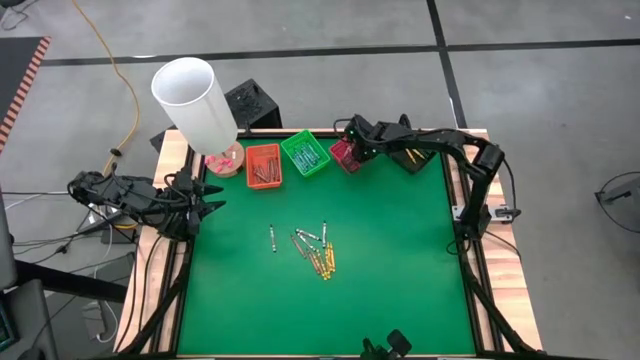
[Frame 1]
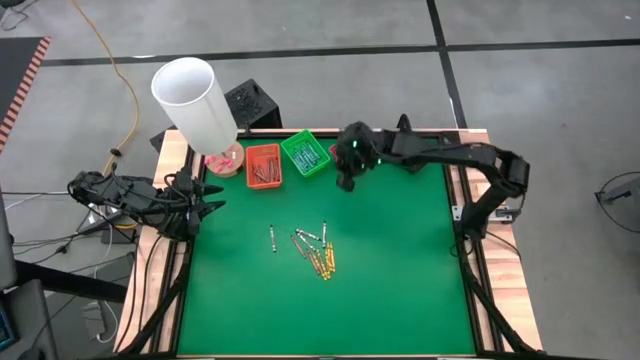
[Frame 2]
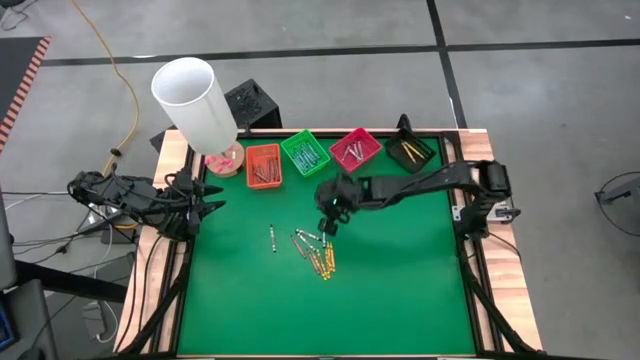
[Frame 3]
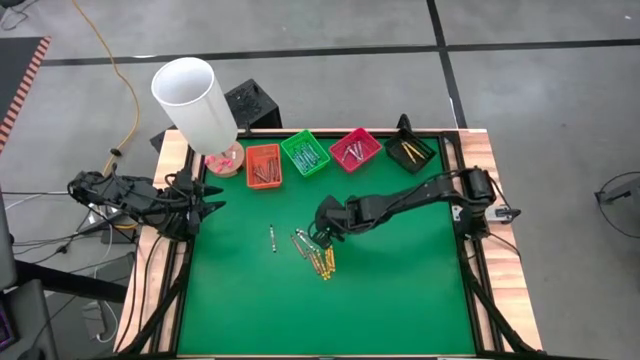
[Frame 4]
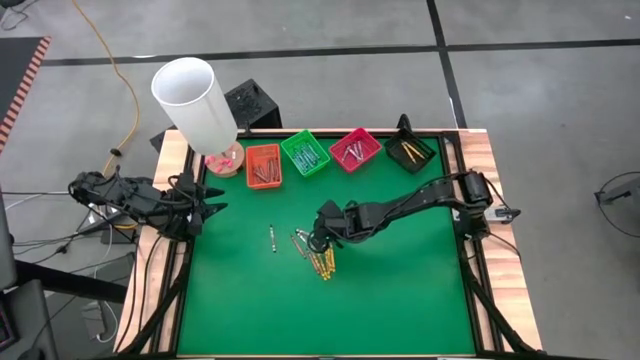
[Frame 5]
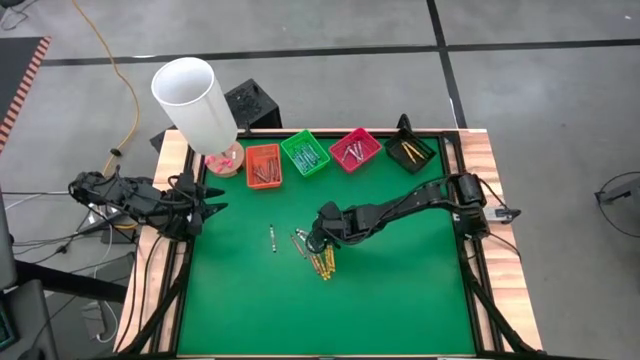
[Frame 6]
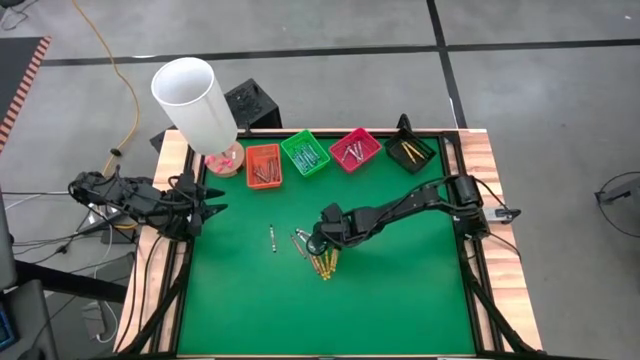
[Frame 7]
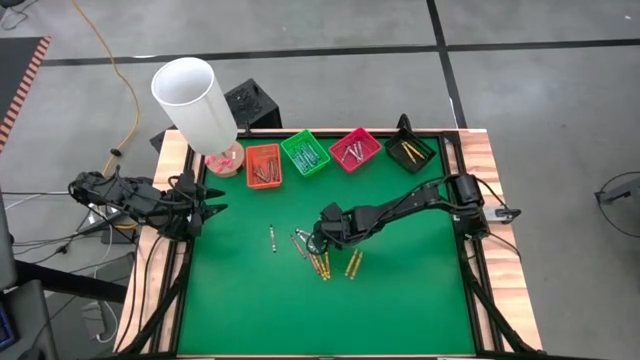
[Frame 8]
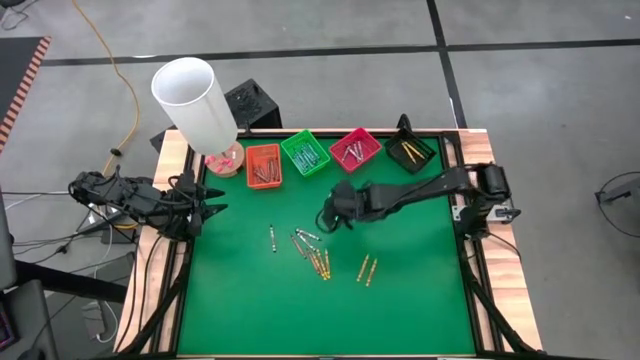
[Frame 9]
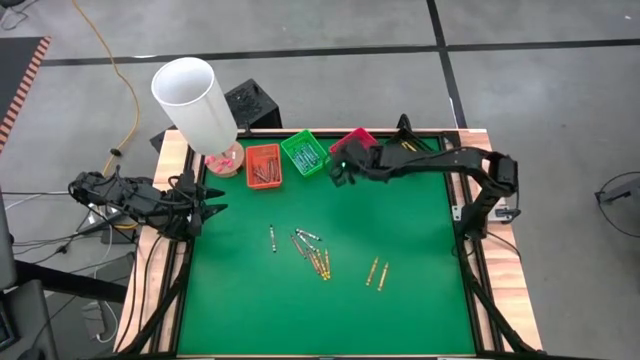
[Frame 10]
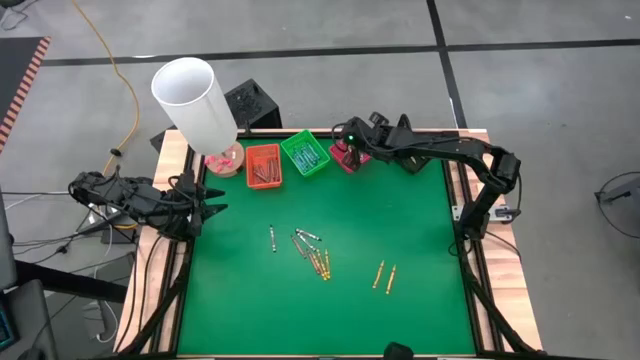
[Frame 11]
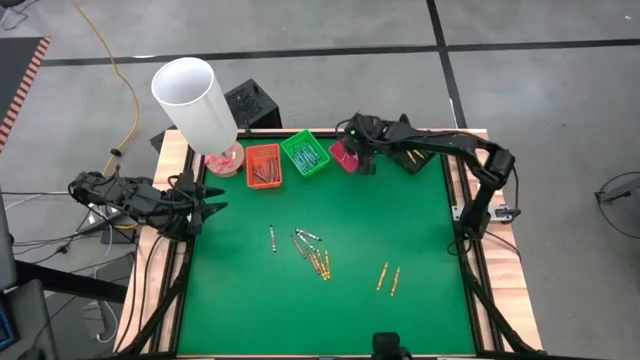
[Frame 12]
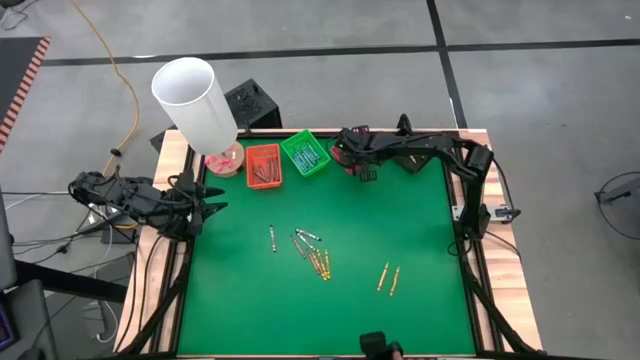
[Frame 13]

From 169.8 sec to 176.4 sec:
Task: Sort crayons
Put the black crayon into the red bin

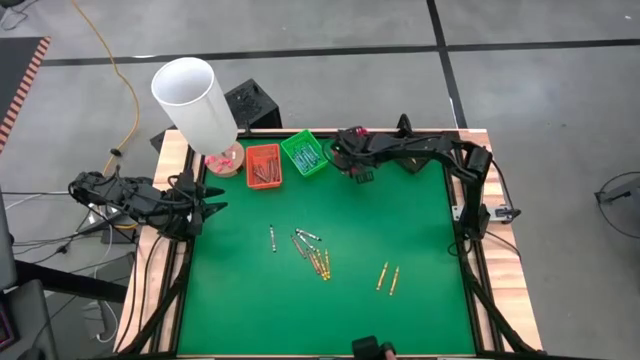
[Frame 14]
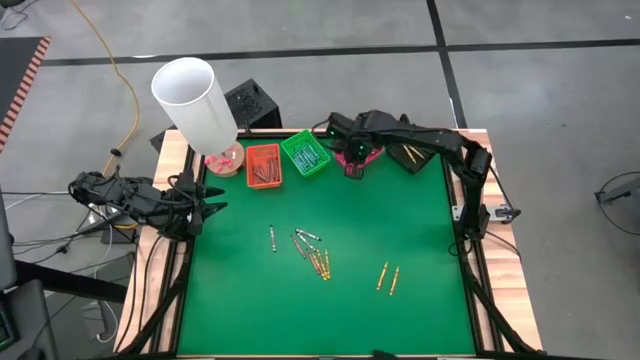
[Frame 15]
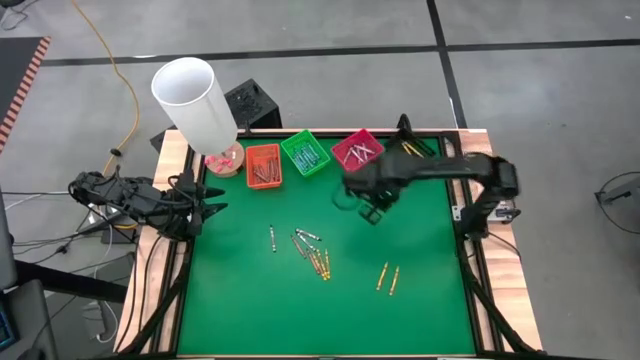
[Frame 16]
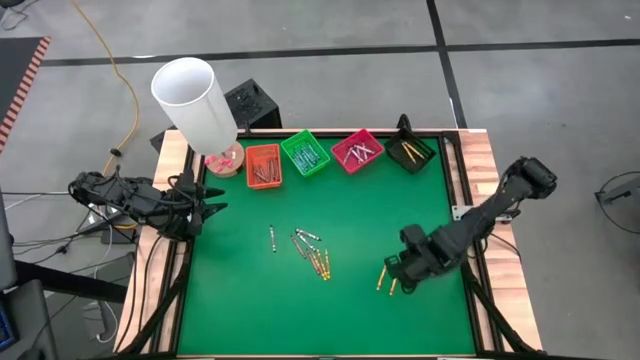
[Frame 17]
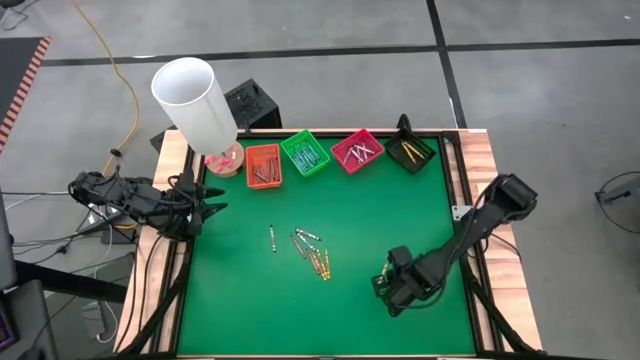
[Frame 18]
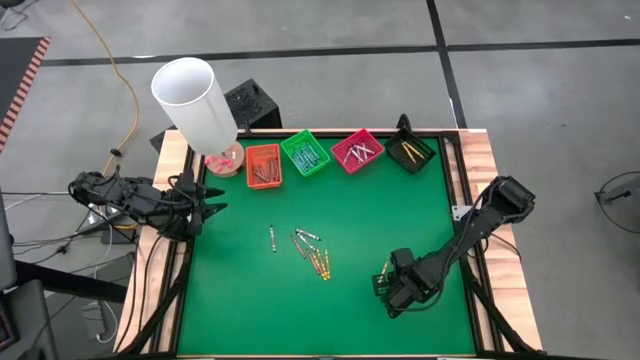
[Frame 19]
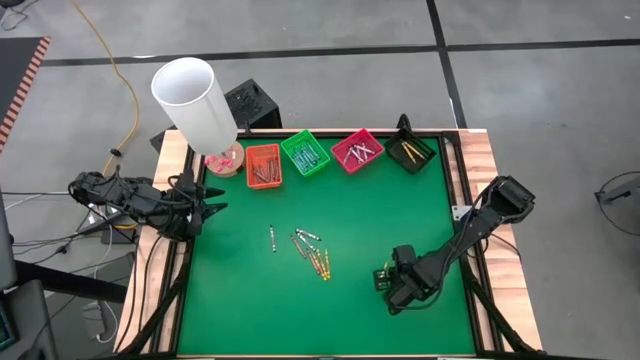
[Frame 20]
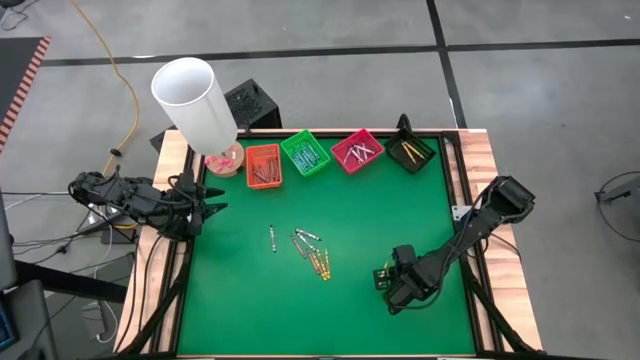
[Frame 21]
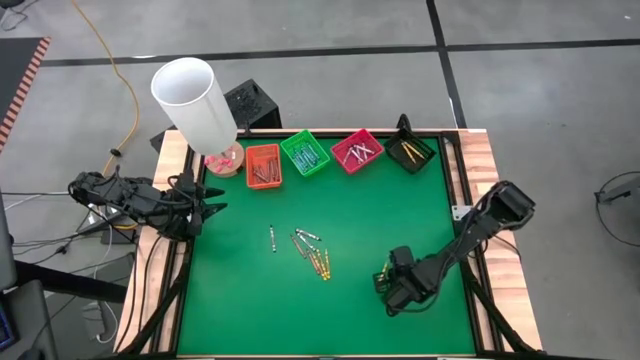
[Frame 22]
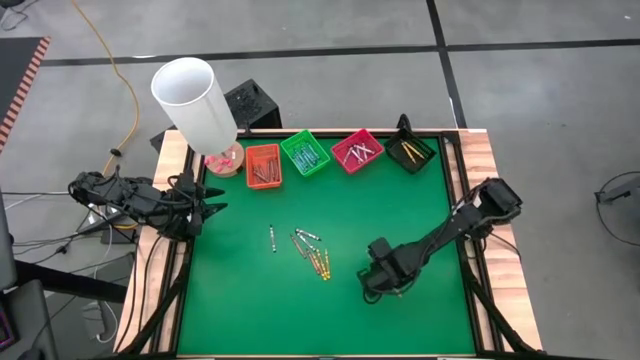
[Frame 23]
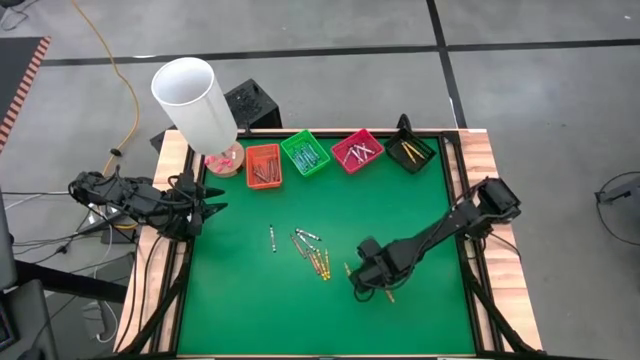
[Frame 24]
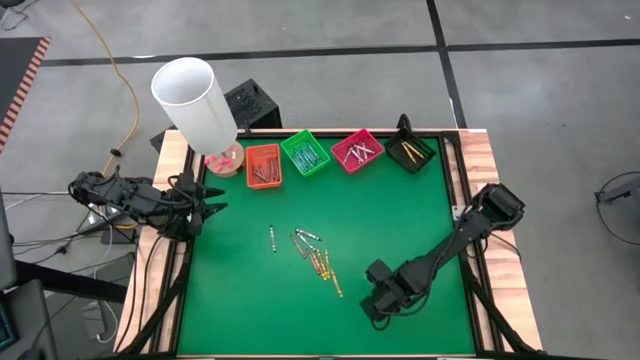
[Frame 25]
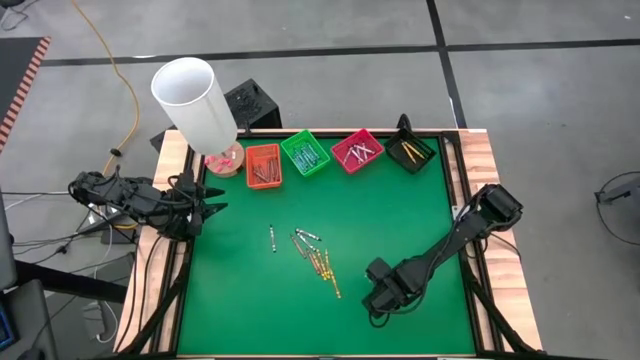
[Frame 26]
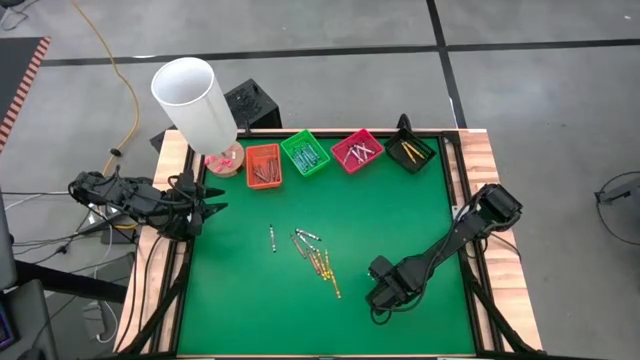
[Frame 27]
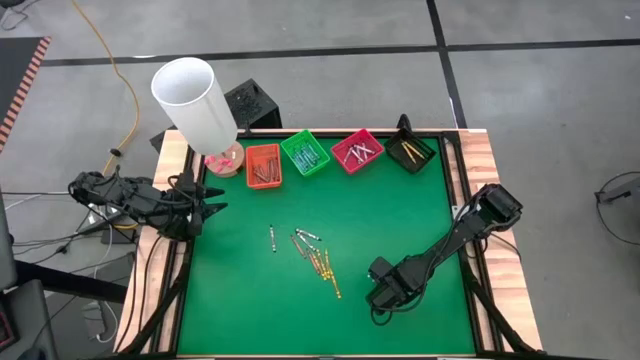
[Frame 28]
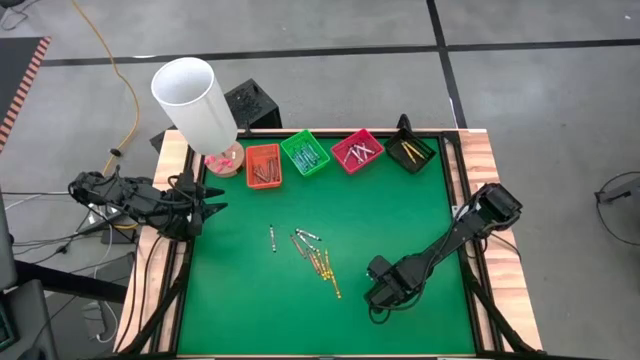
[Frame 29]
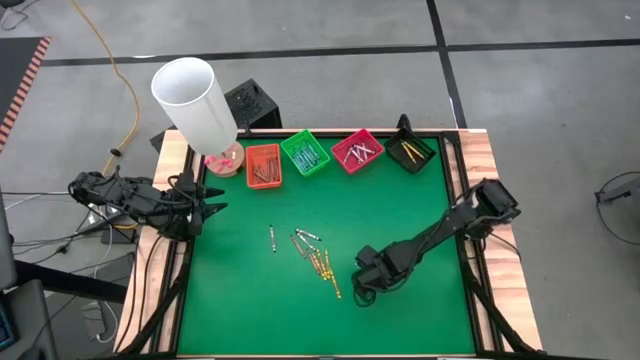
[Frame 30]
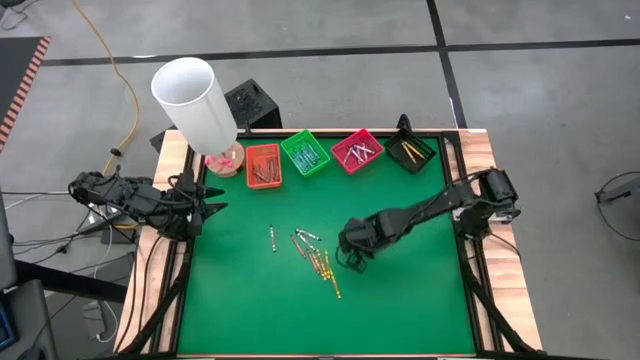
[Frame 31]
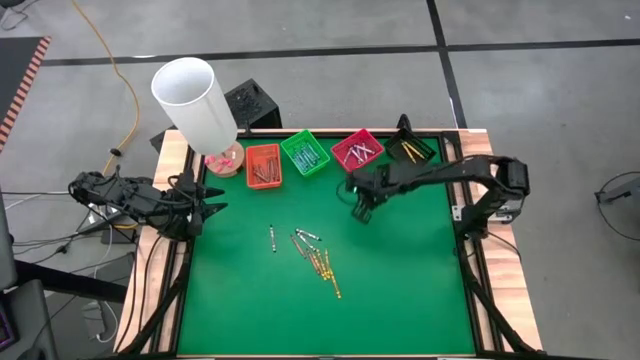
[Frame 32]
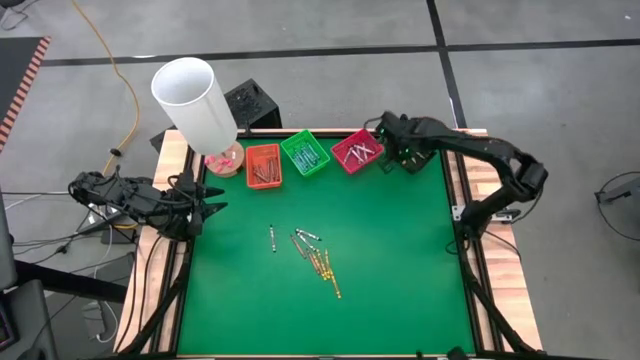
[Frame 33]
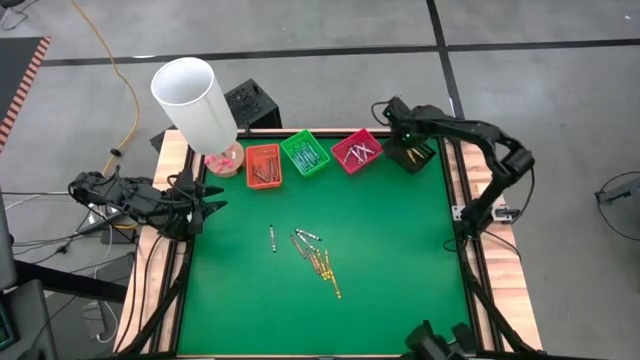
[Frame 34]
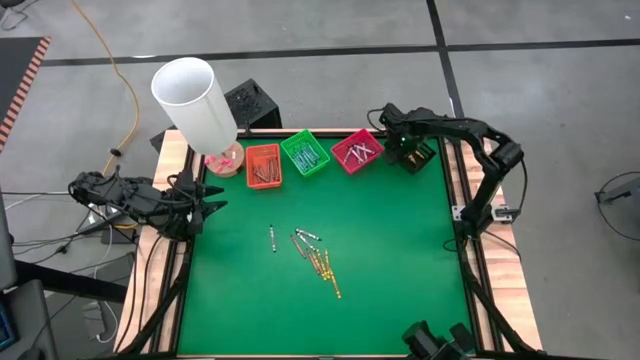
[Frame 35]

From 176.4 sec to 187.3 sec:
Put the yellow/green crayon into the black bin

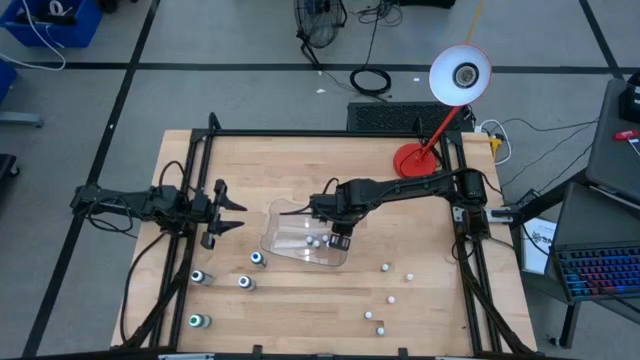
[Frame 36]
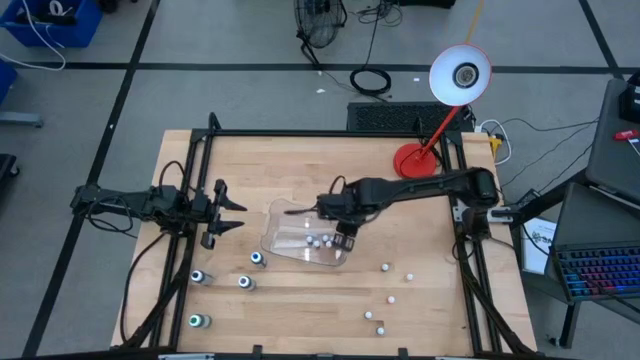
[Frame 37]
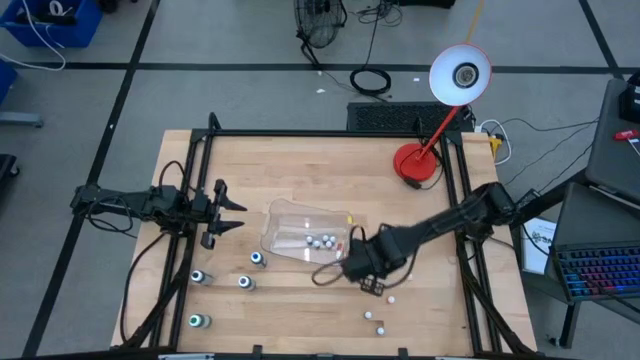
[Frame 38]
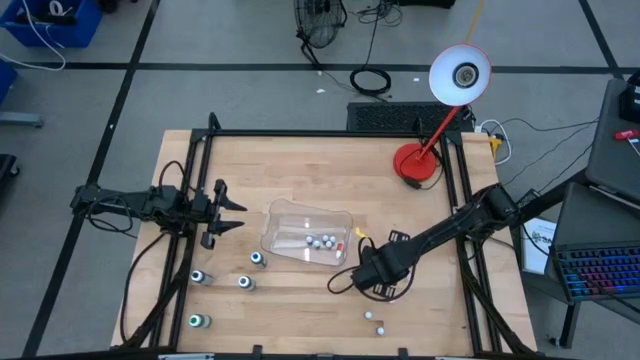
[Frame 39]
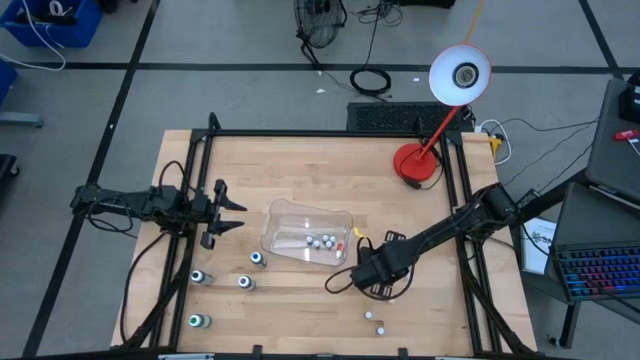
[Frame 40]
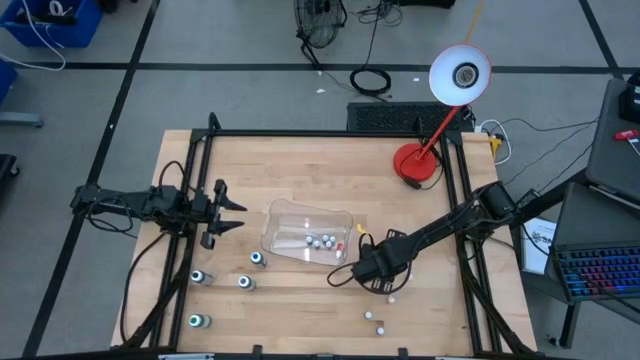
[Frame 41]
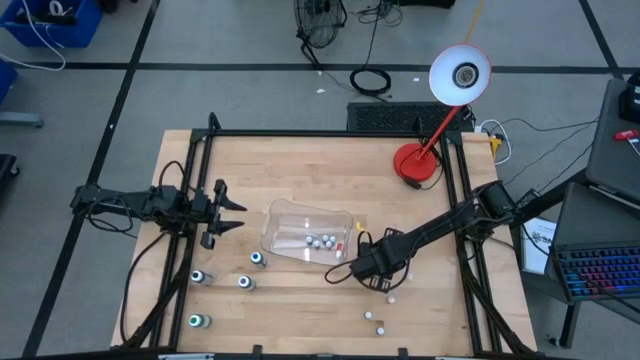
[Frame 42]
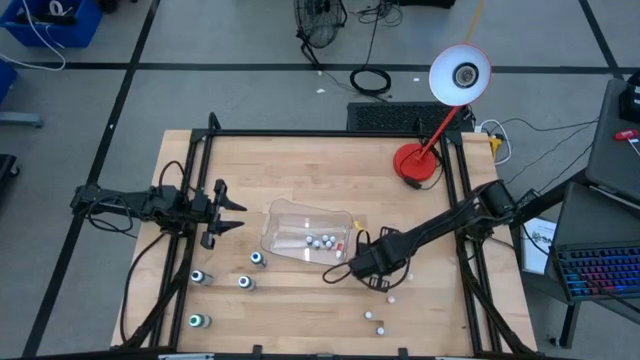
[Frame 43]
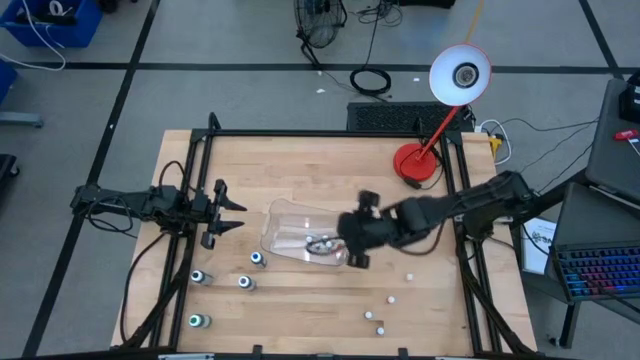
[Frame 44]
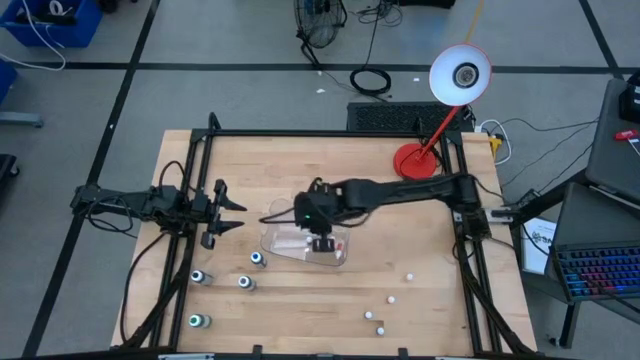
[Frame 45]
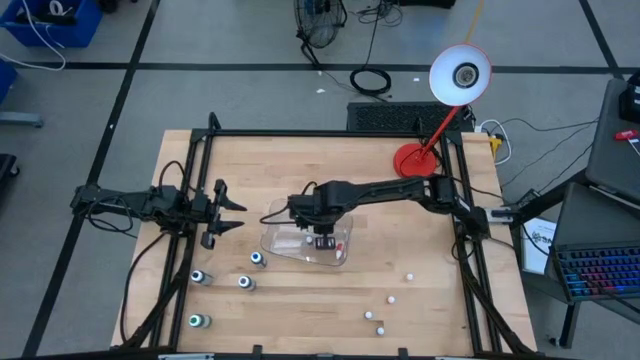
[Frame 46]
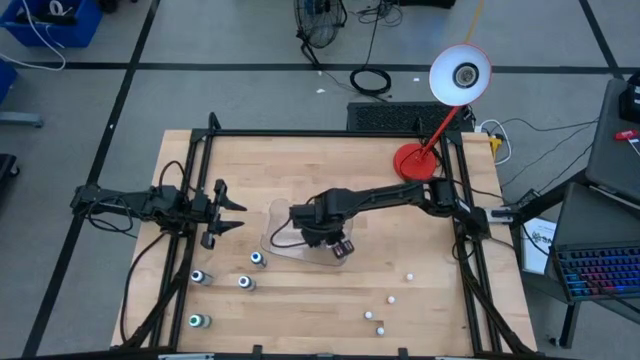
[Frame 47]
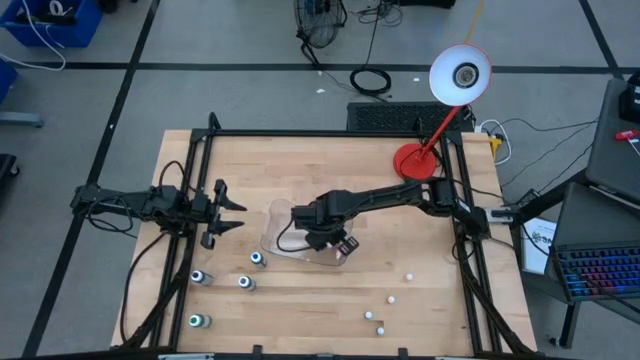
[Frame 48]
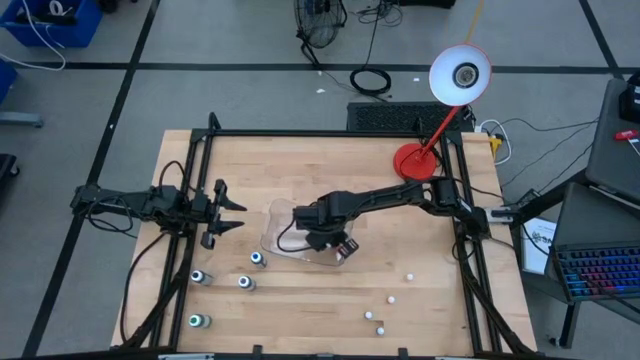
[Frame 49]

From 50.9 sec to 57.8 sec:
Task: Pick & Place food coloring
Put the small violet food coloring bottle into the transparent bin
